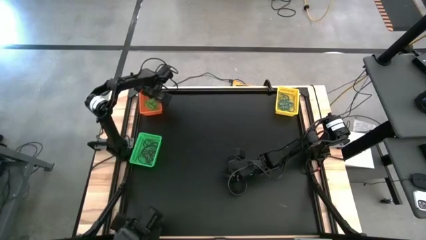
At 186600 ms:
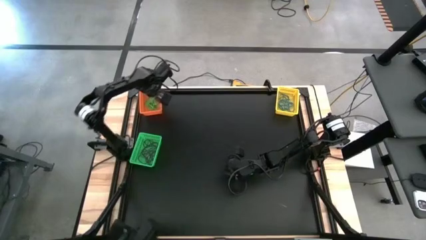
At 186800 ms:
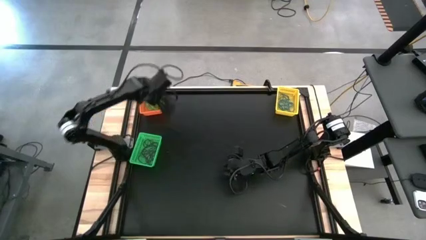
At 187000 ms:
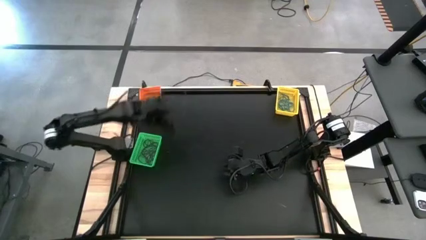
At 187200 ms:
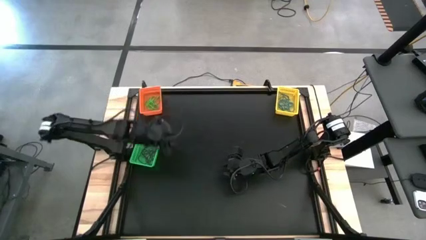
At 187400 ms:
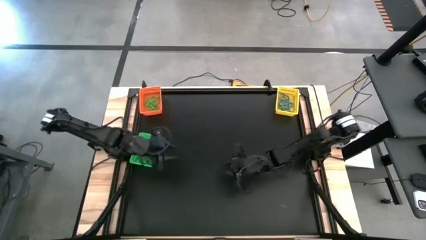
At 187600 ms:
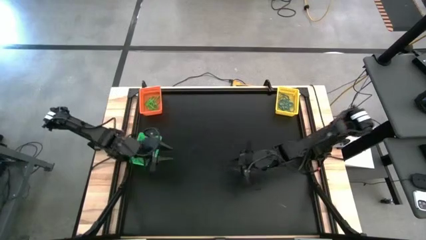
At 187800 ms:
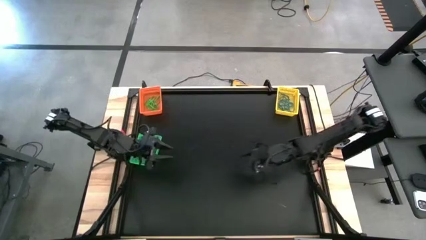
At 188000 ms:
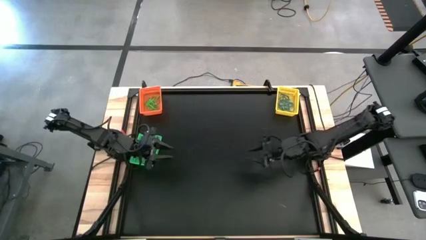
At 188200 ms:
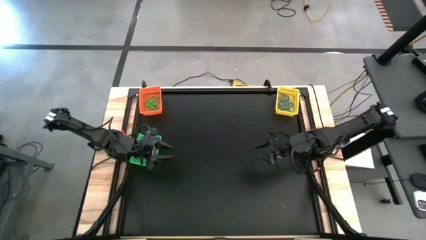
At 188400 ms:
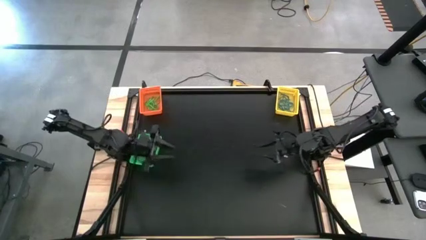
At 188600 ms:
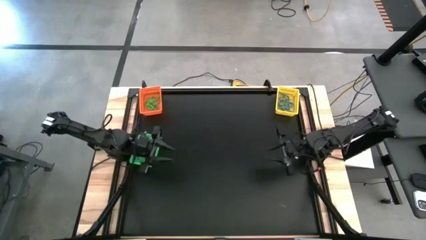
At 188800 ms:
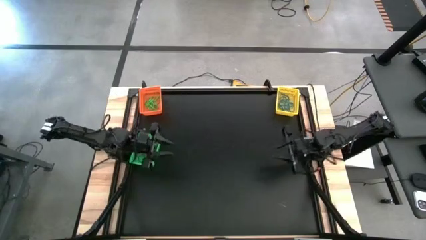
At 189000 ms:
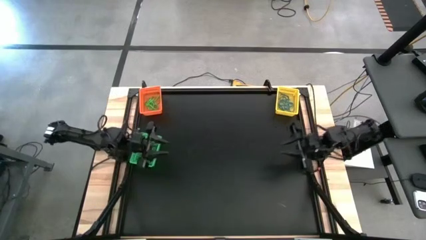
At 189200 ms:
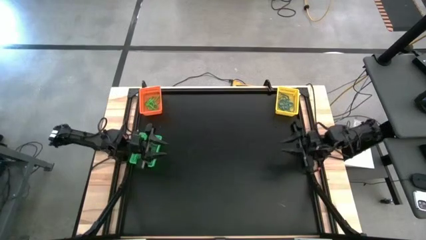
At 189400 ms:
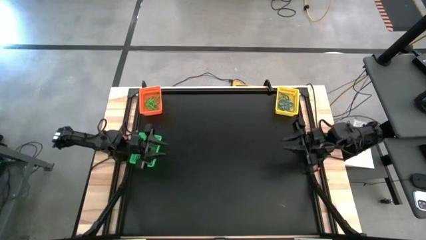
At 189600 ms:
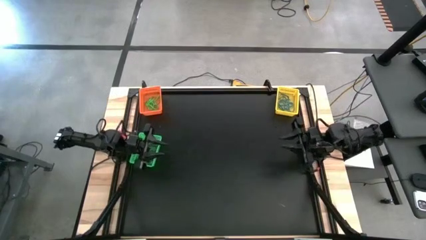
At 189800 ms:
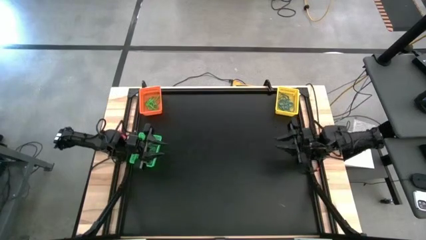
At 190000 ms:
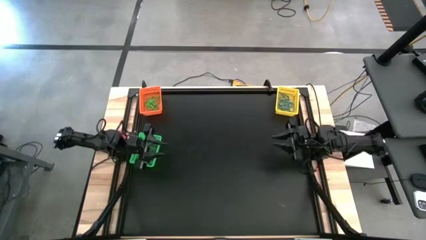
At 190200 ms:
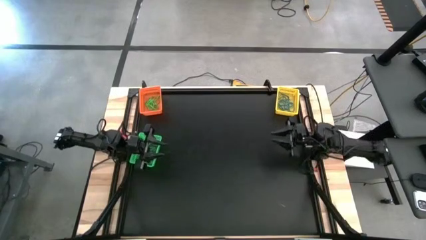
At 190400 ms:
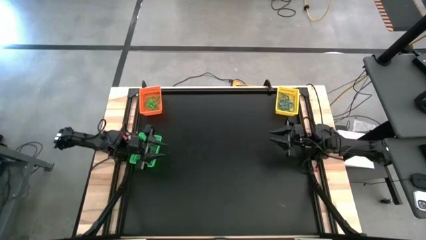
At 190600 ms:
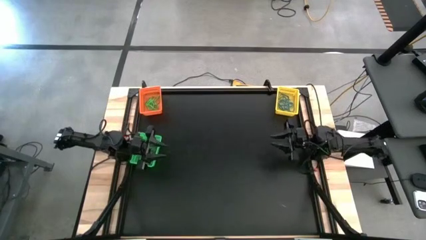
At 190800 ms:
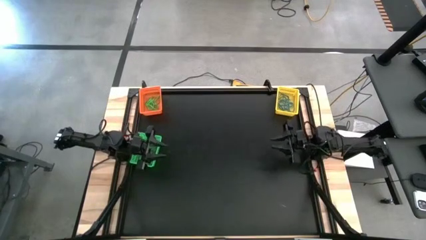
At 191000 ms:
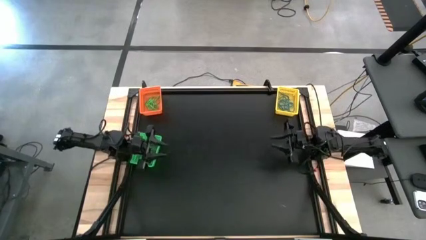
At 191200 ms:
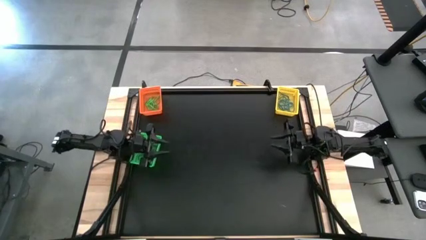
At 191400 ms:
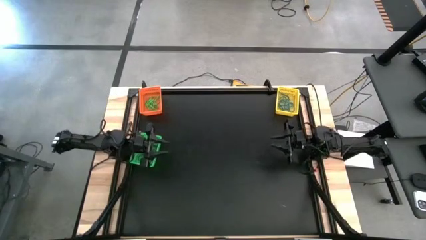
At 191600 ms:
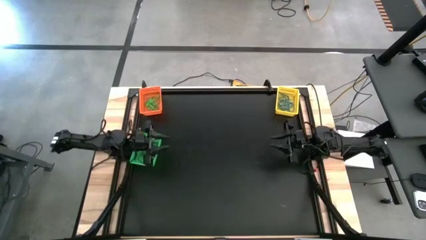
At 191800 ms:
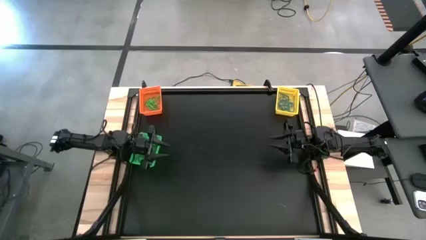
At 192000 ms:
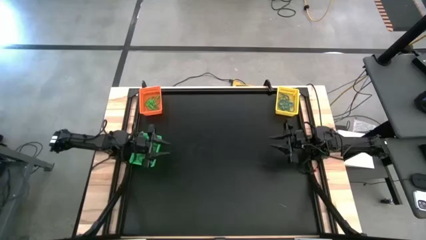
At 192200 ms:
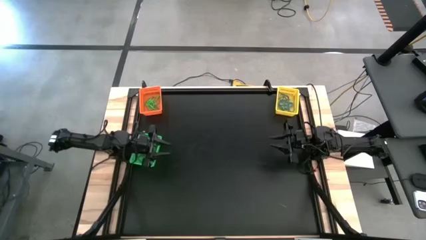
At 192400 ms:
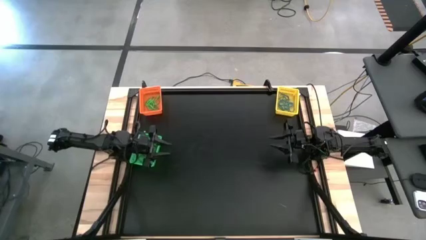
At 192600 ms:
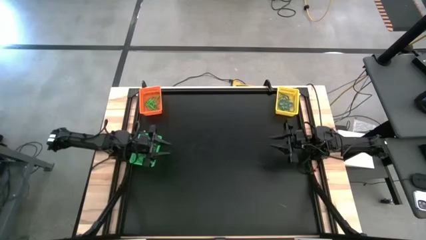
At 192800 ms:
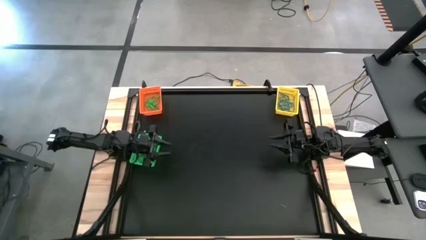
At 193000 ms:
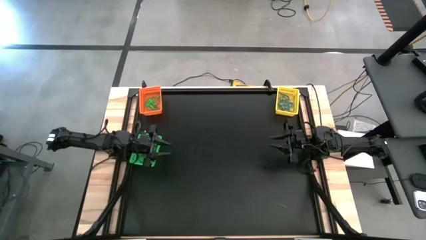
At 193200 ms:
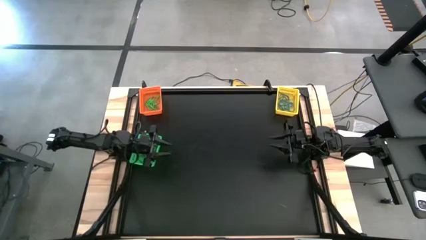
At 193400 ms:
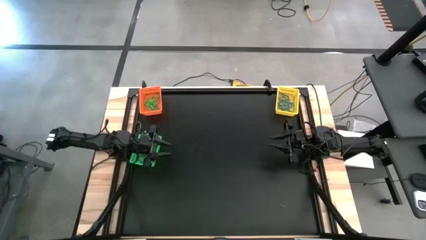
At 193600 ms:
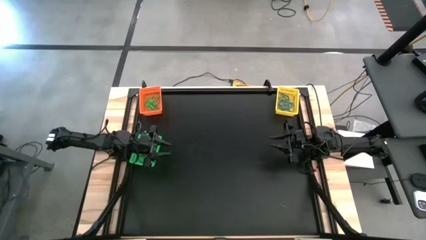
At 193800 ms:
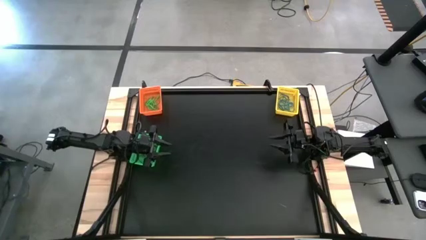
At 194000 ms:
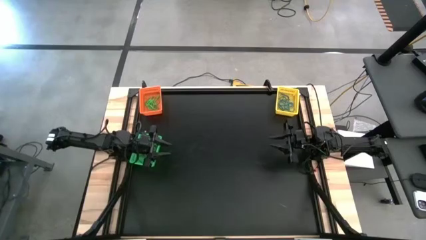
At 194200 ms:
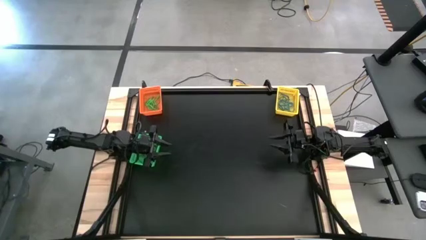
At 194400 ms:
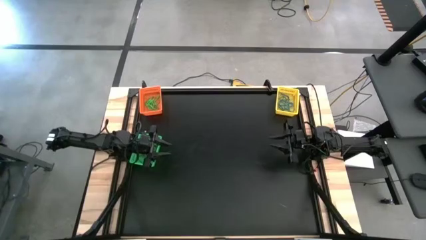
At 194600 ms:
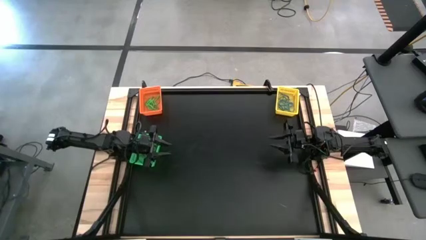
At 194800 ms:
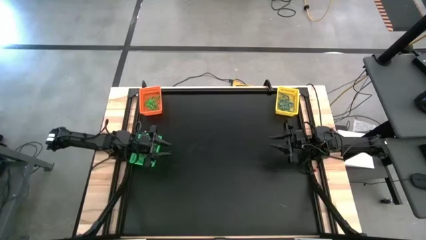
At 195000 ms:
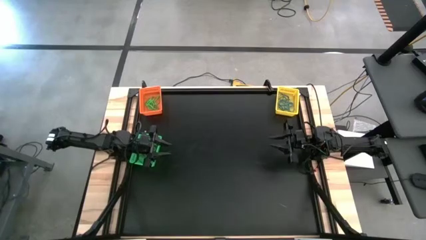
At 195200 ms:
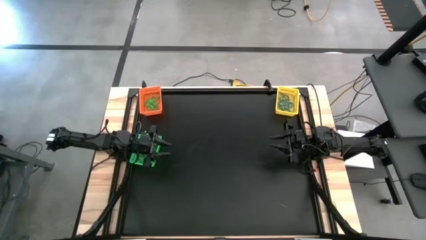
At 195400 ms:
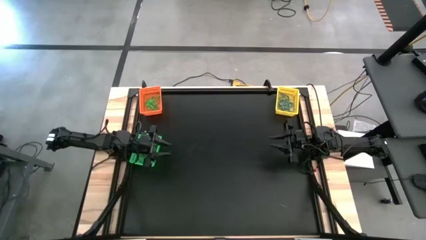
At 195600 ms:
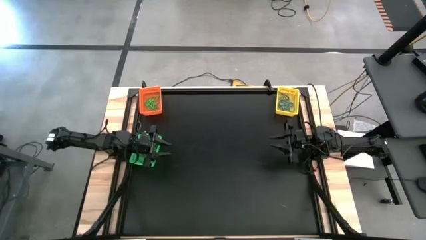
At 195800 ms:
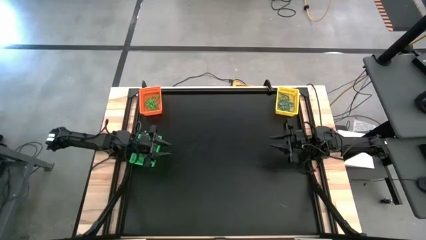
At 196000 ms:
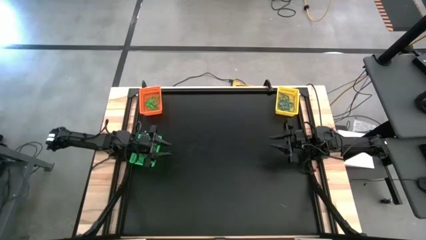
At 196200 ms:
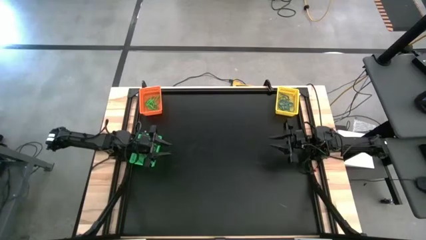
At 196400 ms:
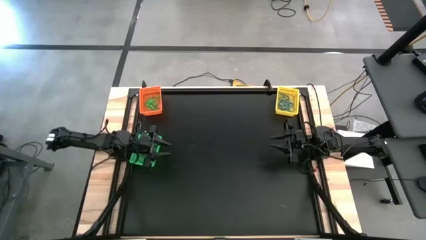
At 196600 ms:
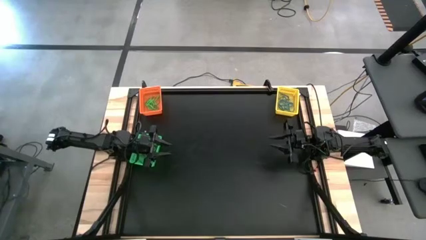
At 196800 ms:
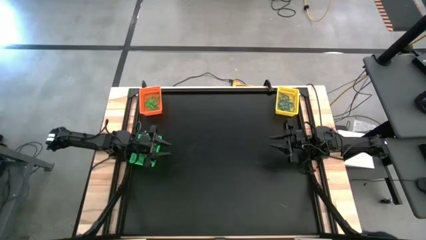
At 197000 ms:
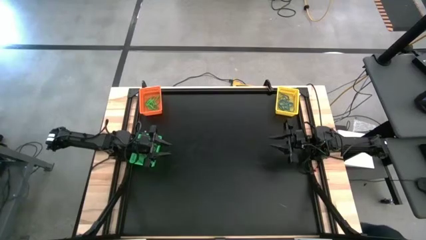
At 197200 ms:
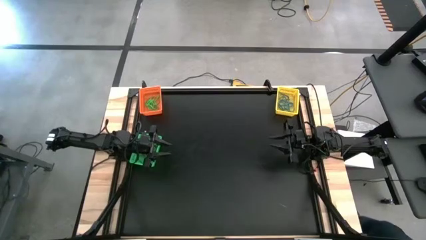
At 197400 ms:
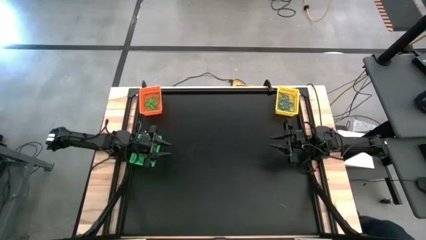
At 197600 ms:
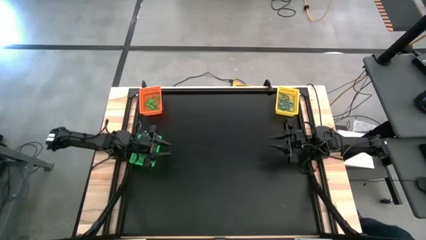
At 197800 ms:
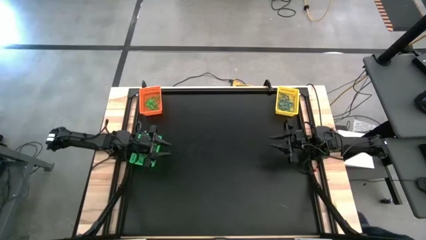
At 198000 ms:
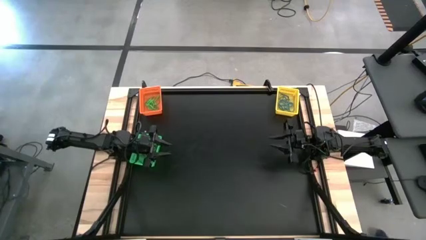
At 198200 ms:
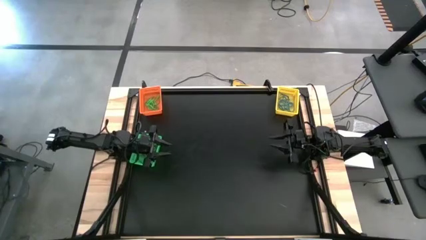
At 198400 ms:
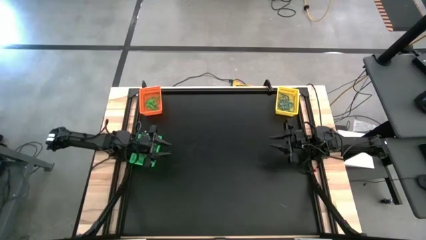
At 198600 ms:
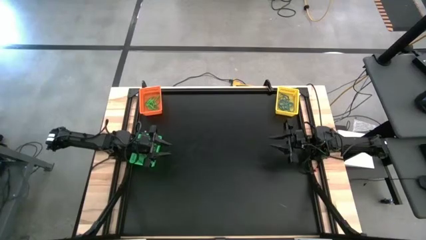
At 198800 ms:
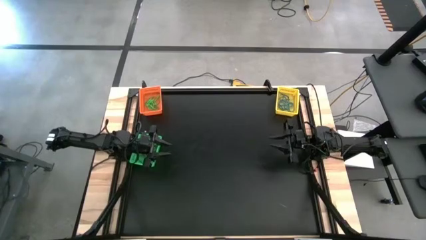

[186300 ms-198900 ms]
Task: Sort rubber bands into baskets
Return to Home Position

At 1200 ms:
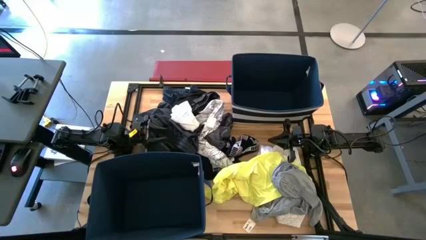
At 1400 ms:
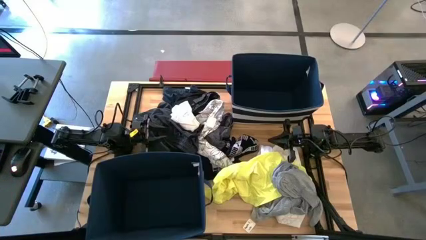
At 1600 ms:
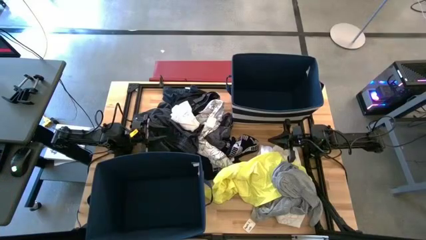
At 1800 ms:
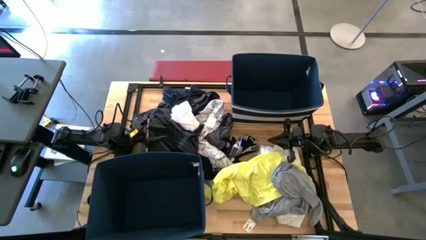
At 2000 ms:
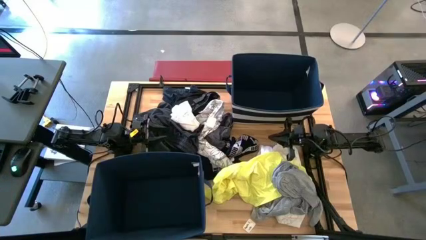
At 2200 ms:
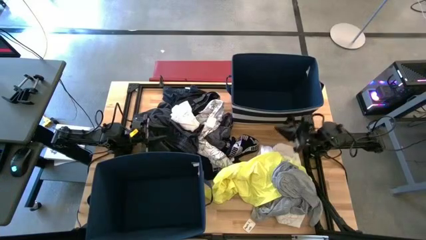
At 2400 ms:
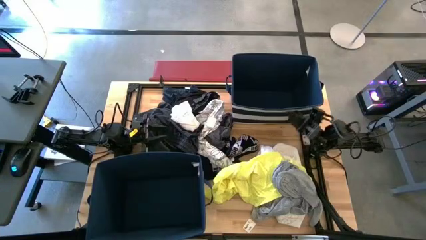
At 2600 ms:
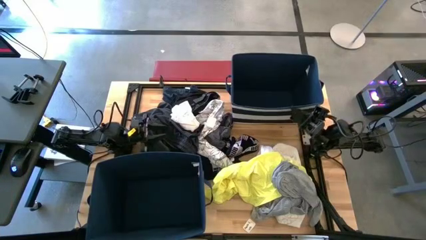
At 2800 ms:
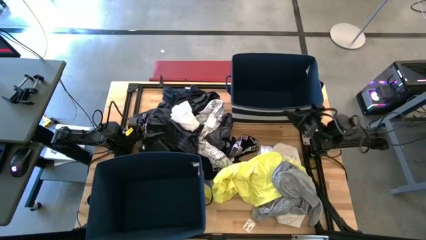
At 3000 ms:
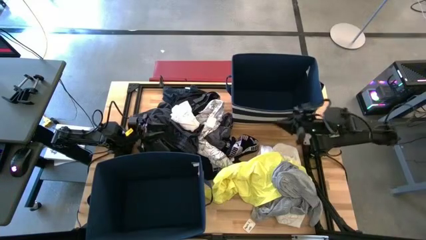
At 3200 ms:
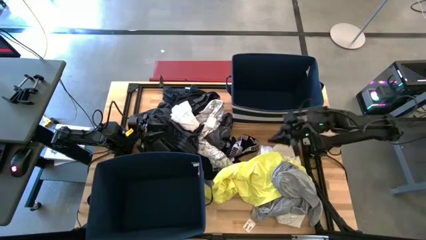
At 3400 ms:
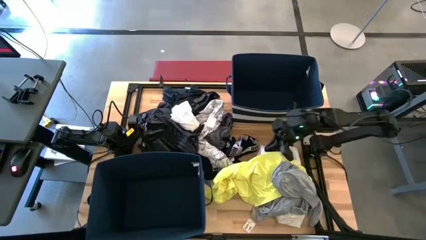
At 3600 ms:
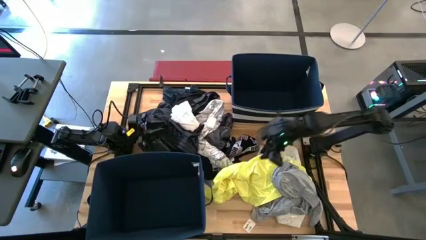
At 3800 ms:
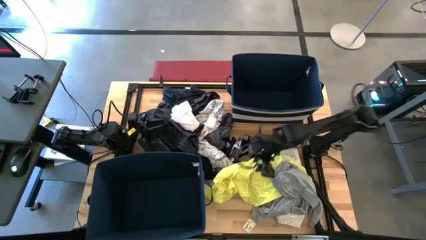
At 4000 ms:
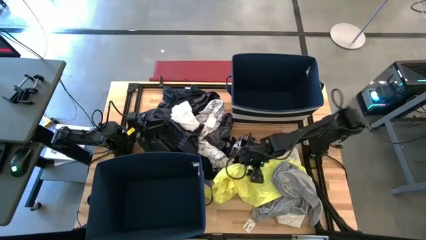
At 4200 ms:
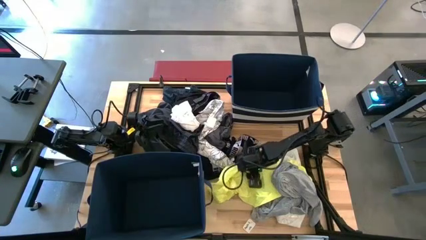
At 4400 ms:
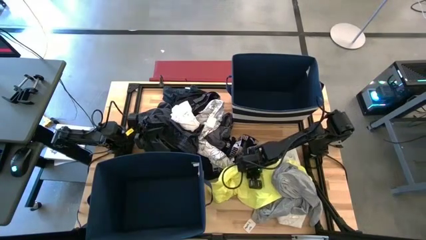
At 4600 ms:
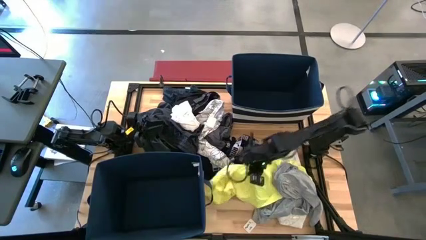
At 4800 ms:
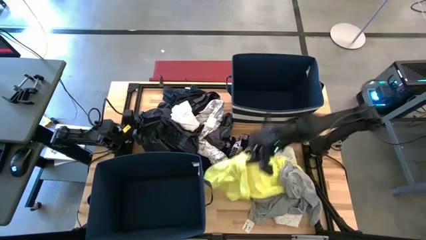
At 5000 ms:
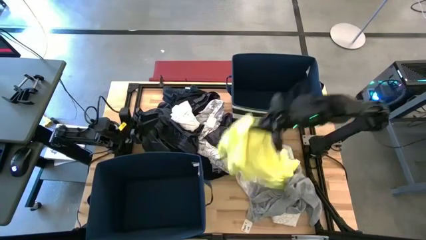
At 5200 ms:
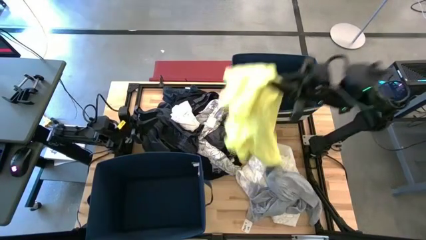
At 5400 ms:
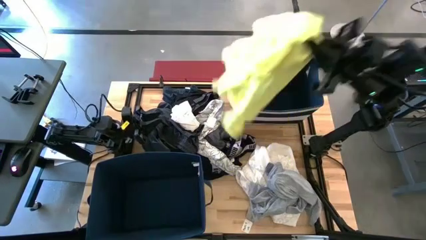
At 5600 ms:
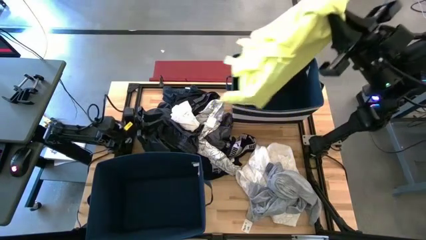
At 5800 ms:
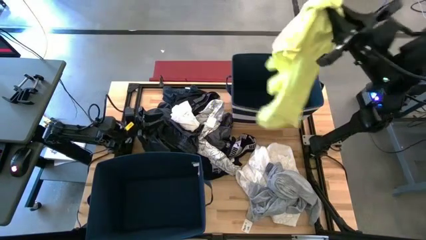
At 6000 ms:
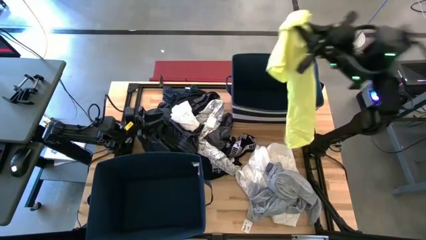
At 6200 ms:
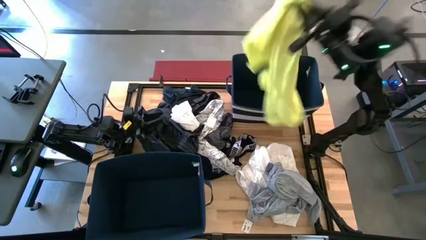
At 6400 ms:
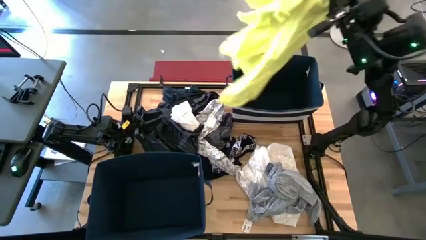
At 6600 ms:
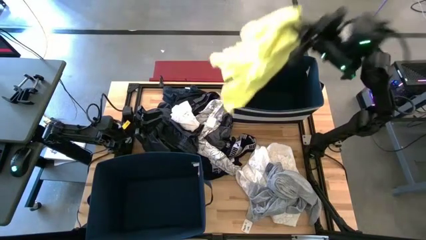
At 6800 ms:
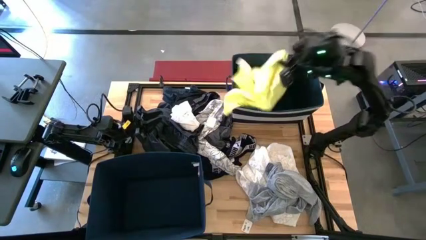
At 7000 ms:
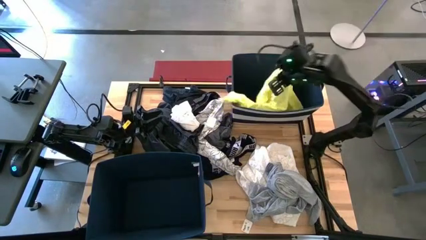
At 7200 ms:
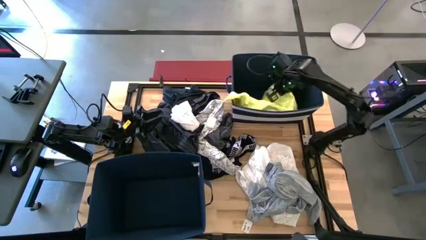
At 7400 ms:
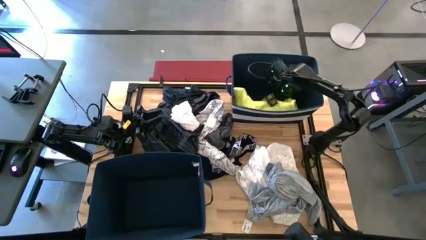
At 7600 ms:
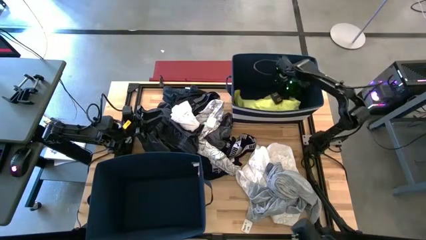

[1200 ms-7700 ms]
Task: Sort clothes
Put the yellow dress into the top blue laundry bin
